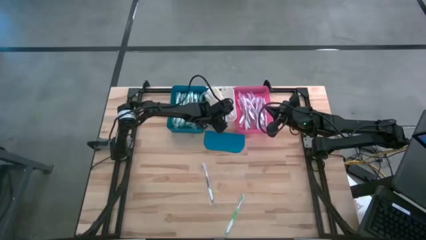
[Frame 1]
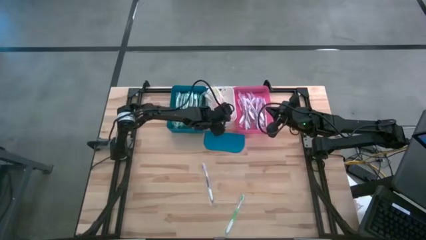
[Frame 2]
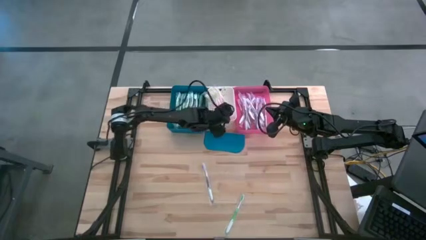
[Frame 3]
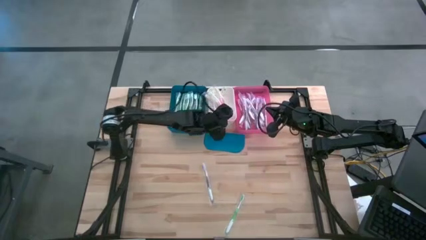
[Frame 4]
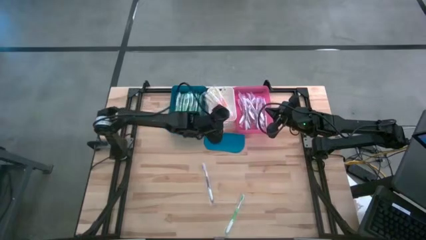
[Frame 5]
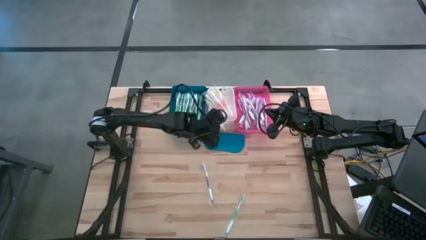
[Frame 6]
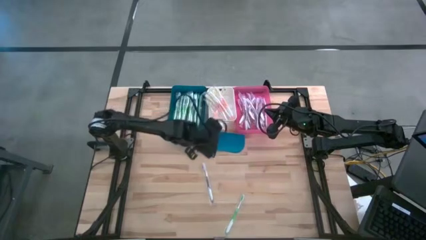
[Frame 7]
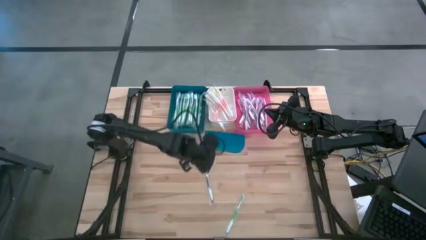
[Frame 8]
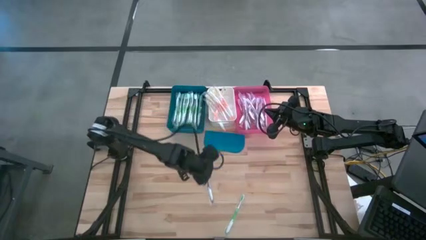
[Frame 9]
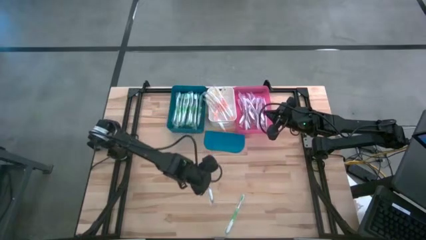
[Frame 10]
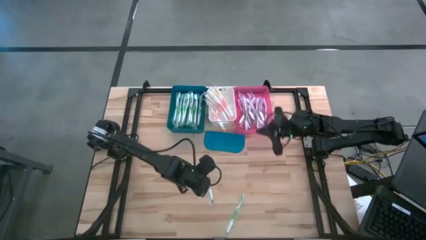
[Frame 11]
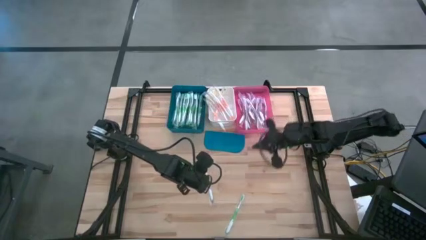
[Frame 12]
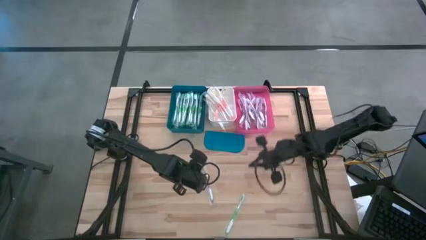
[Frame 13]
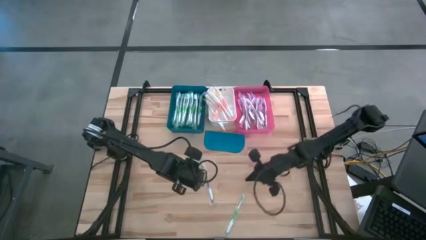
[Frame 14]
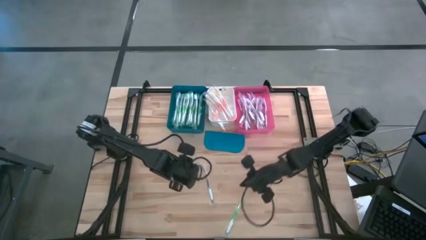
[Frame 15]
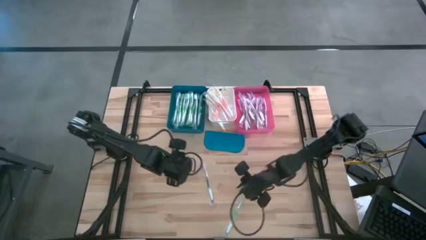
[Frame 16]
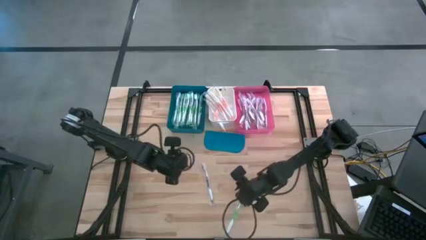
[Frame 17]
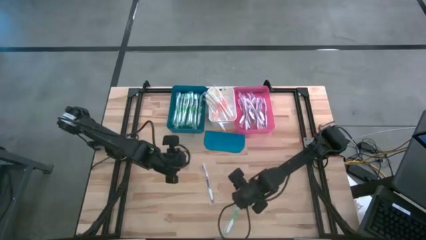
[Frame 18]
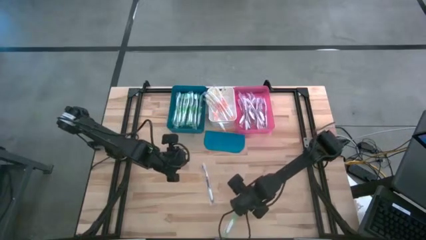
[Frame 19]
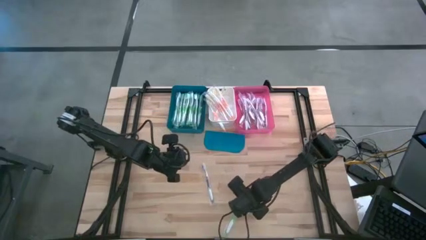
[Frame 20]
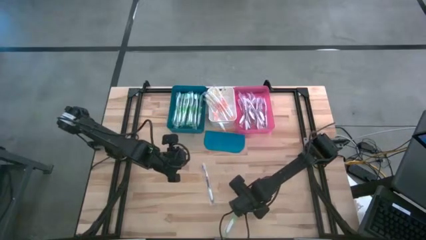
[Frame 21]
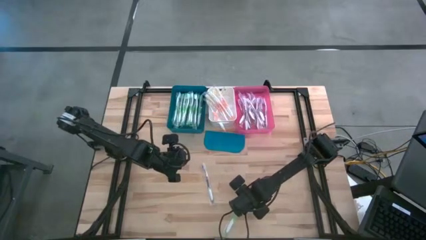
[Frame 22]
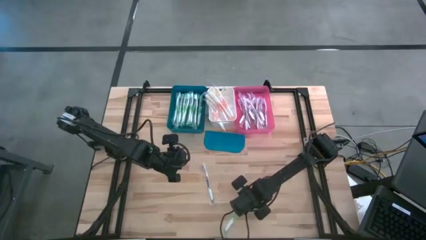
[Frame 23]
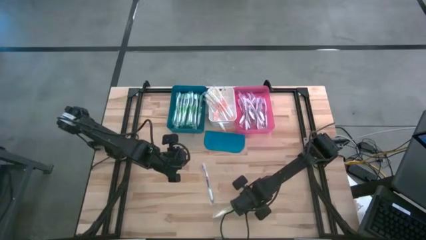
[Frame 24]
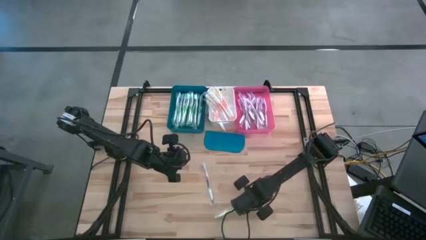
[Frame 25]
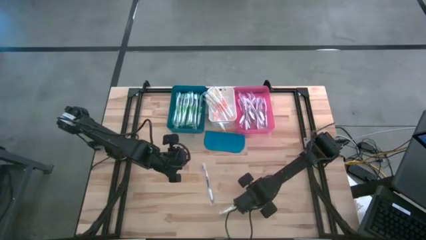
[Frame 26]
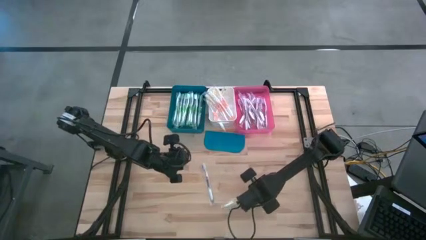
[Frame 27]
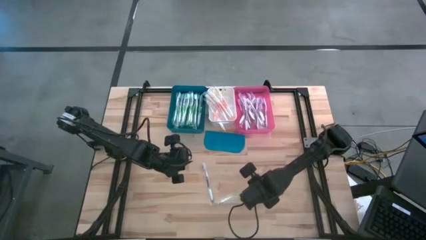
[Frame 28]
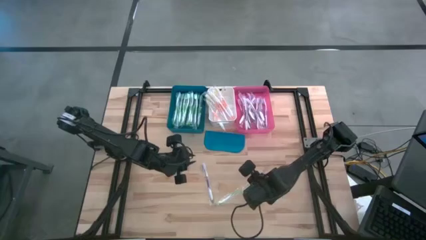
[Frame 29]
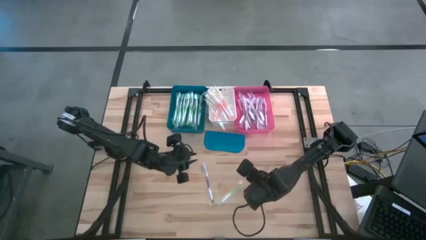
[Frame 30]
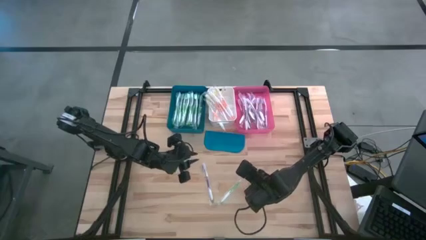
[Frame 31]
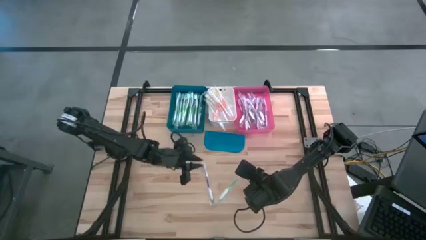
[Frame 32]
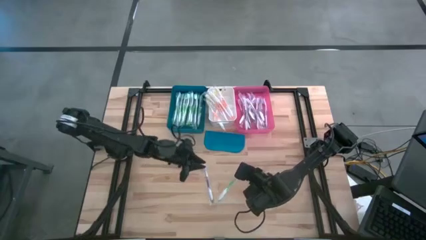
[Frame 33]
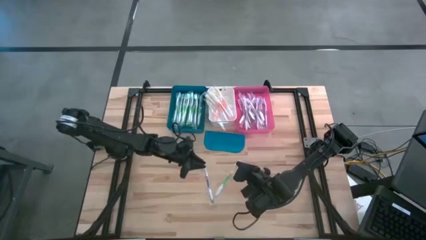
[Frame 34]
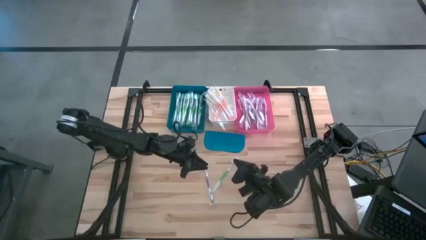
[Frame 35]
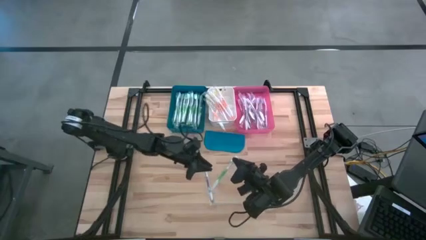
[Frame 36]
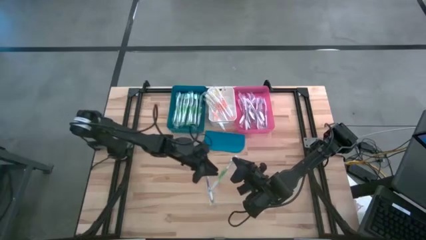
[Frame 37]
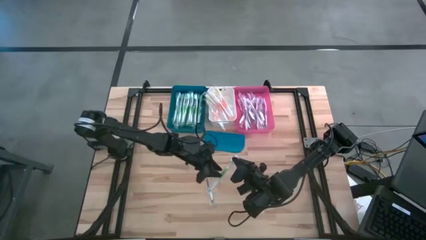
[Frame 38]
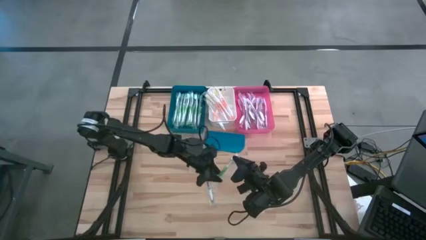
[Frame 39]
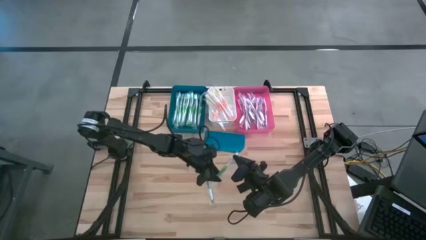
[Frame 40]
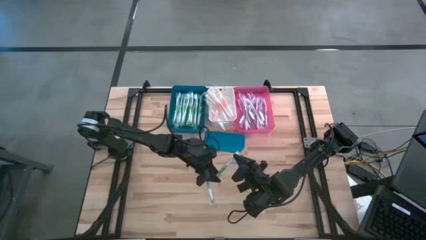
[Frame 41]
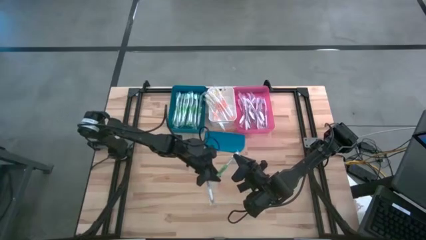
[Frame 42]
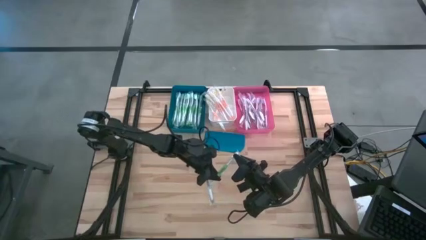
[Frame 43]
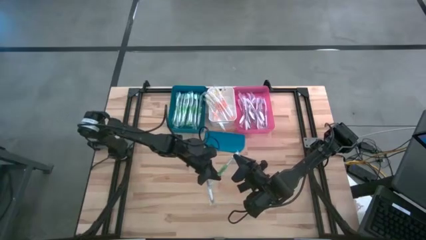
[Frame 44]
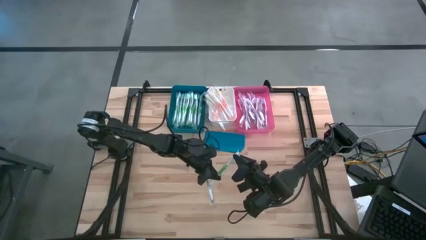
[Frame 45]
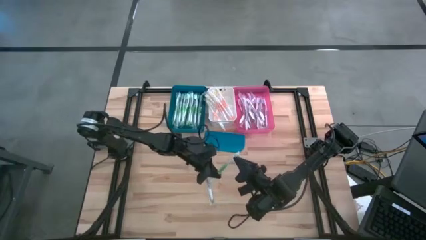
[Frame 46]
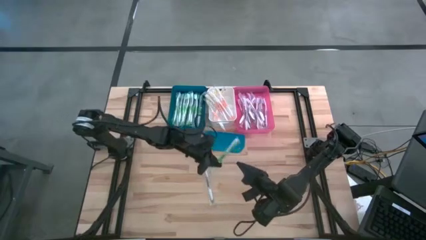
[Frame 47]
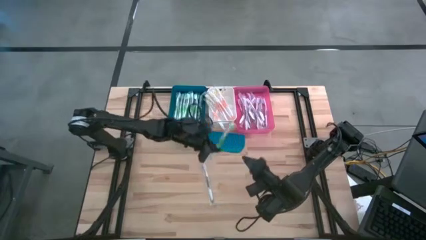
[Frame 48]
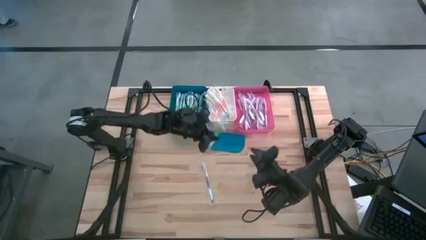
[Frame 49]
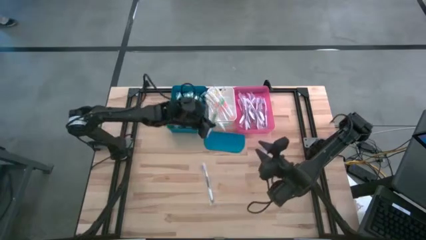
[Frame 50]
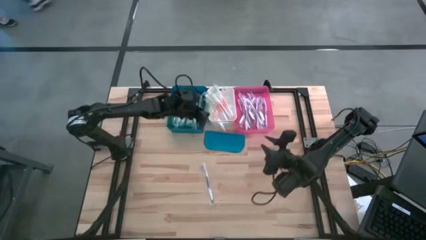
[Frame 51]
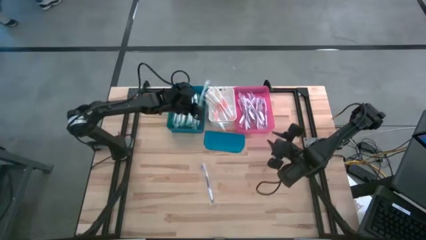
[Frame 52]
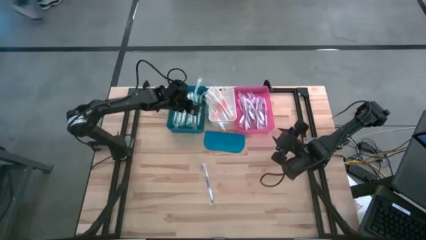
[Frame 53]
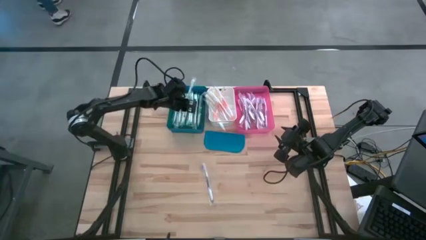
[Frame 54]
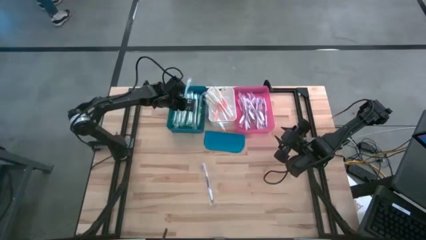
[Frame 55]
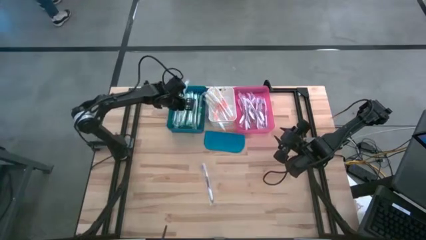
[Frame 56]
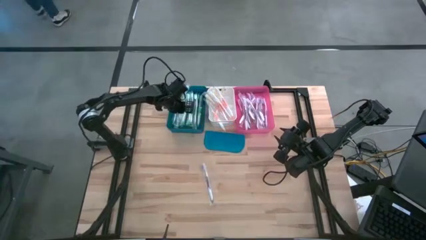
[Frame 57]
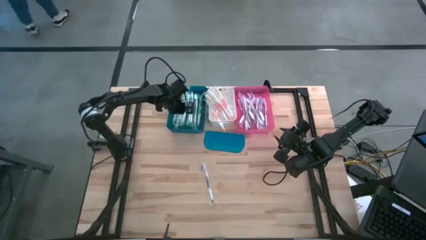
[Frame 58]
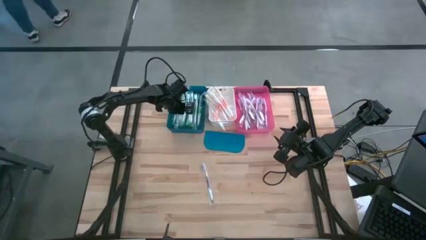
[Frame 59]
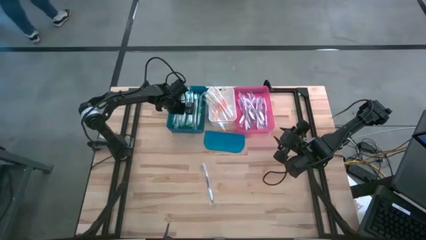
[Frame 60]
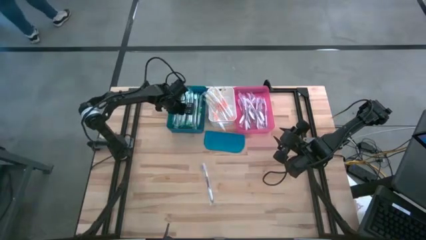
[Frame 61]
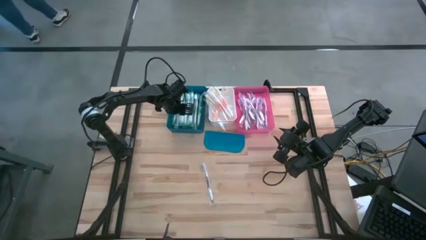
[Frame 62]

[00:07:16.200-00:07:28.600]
Task: Pick & Place Toothbrushes
Put the green toothbrush into the blue bin
